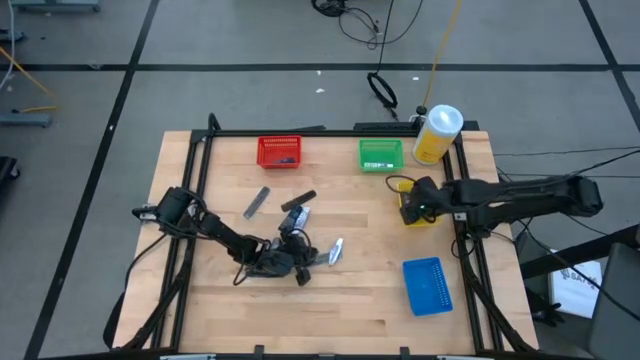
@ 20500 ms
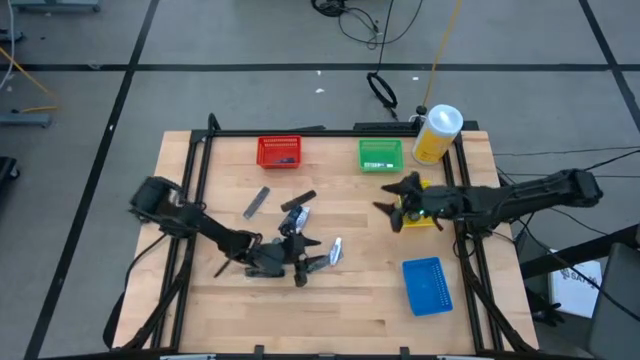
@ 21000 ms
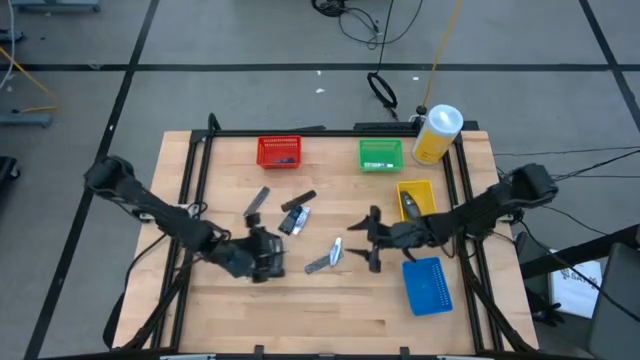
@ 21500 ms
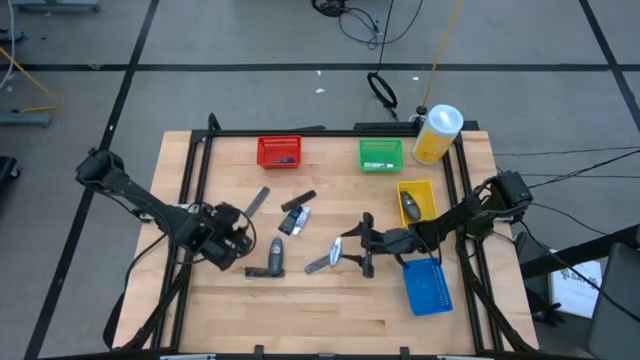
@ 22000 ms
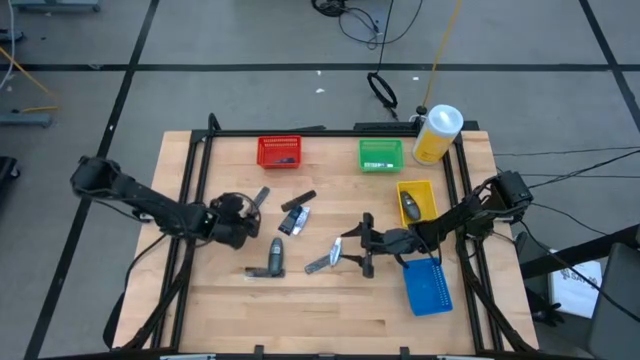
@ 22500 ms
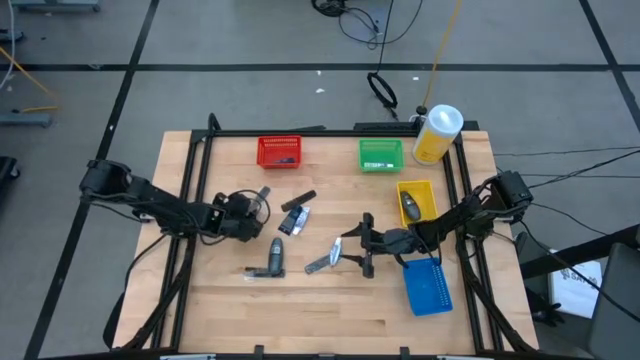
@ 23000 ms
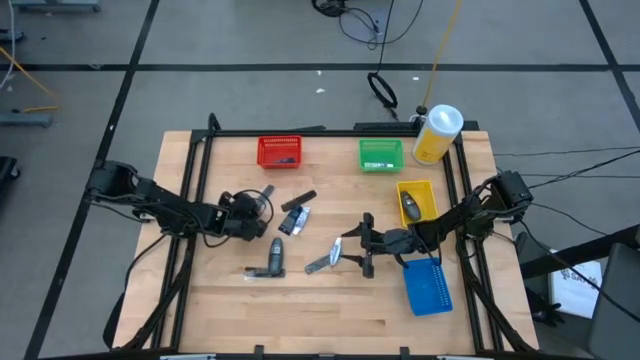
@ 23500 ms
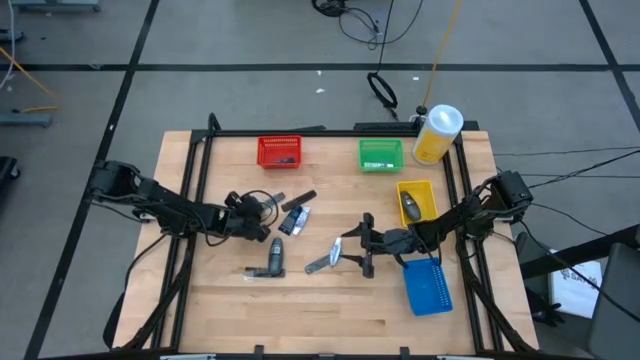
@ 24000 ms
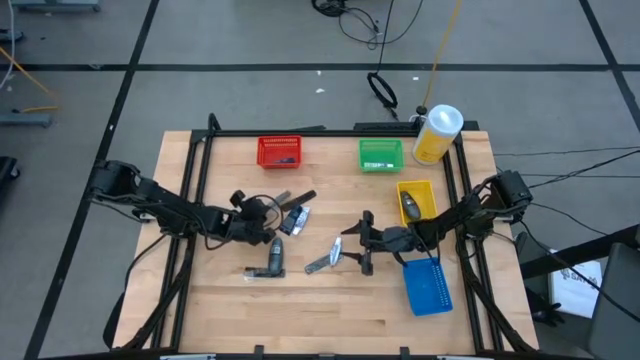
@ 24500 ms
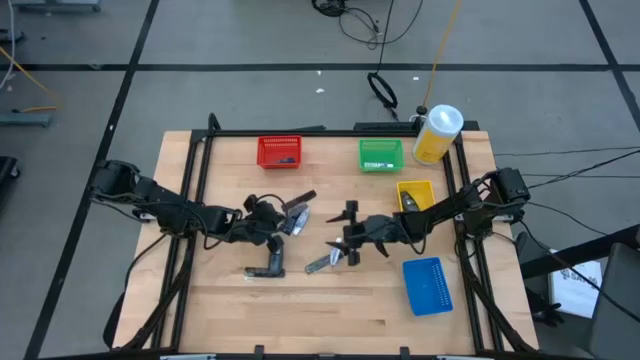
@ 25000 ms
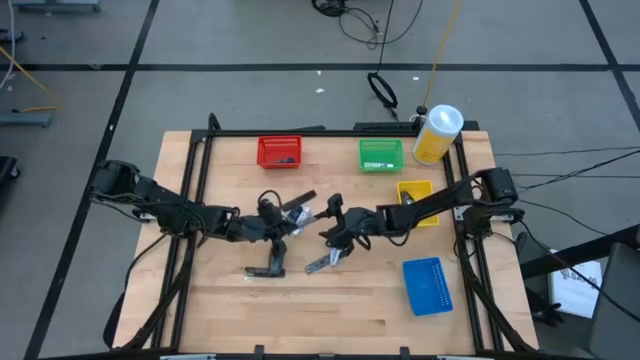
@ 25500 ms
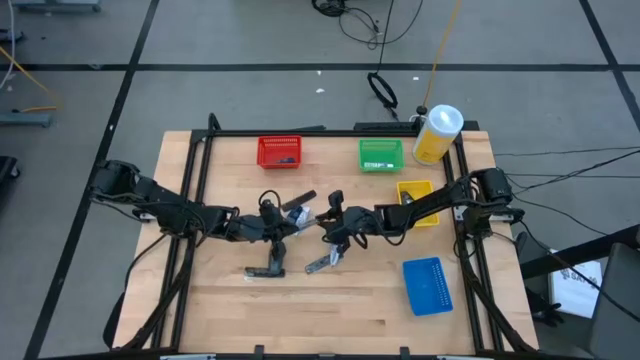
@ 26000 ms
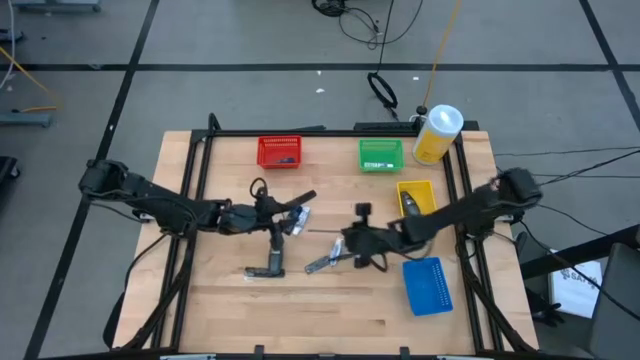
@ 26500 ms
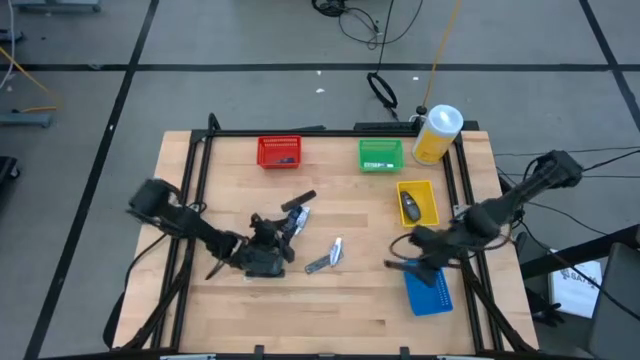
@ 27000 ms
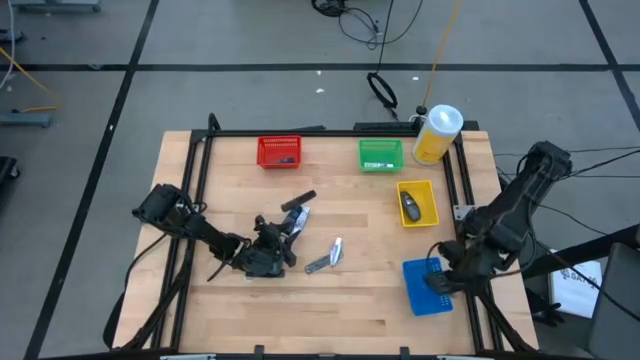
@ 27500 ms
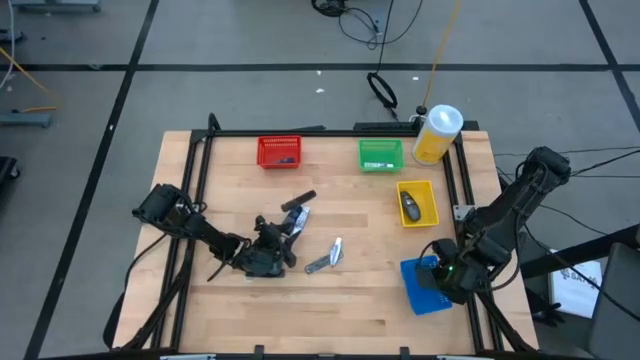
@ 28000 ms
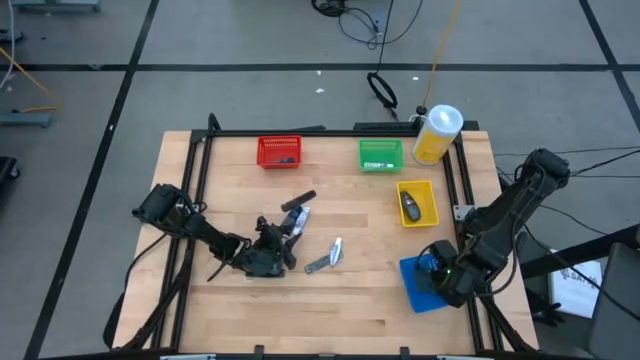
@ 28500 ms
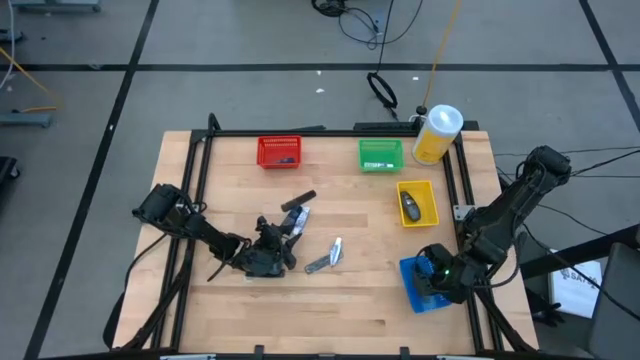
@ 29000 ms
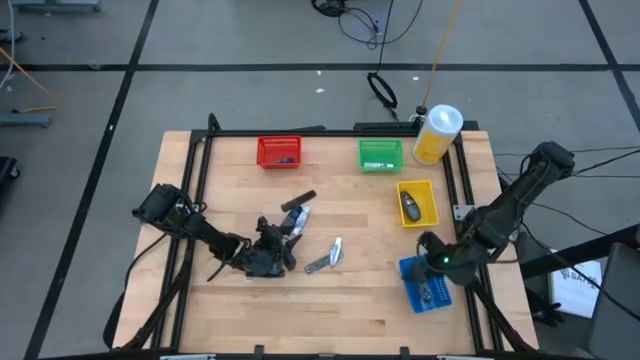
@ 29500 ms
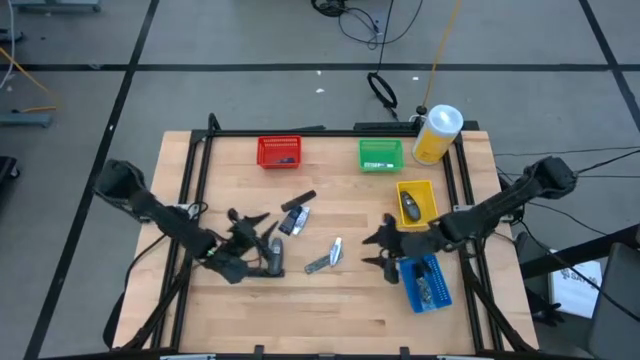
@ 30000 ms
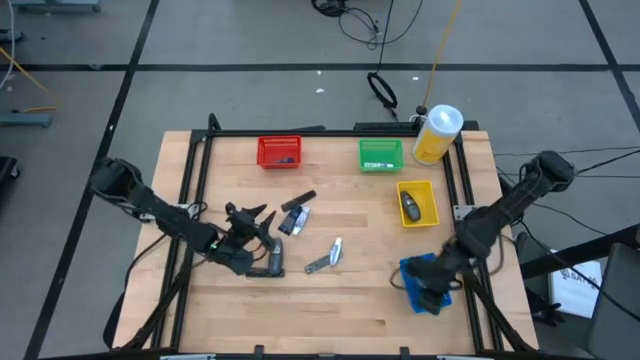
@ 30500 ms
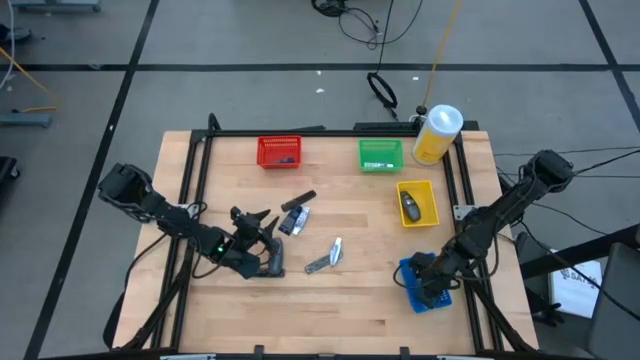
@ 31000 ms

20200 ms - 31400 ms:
Task: Pick & Place Travel size toiletries
Put the black comb into the blue bin

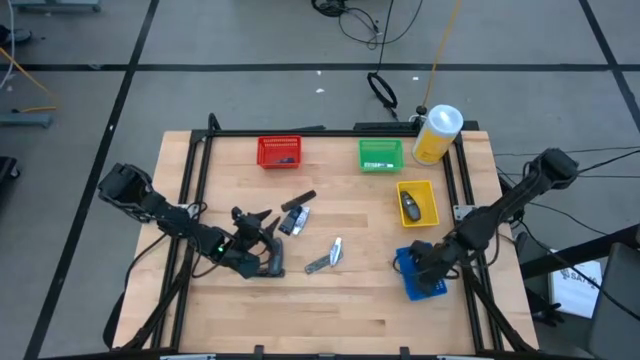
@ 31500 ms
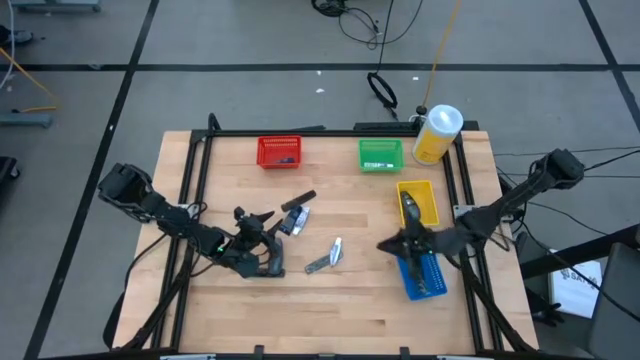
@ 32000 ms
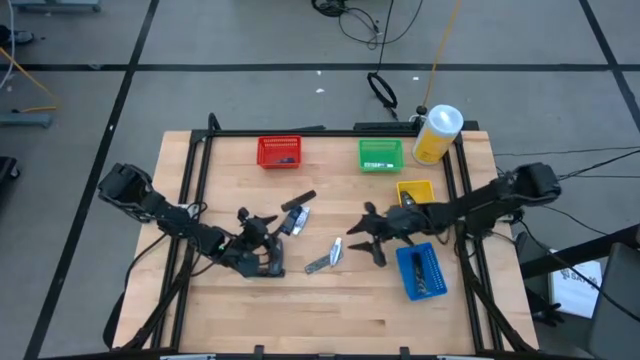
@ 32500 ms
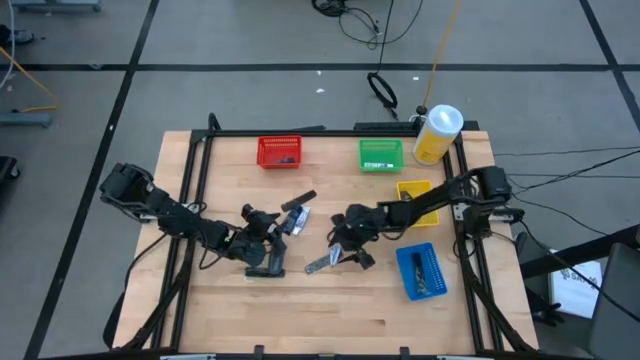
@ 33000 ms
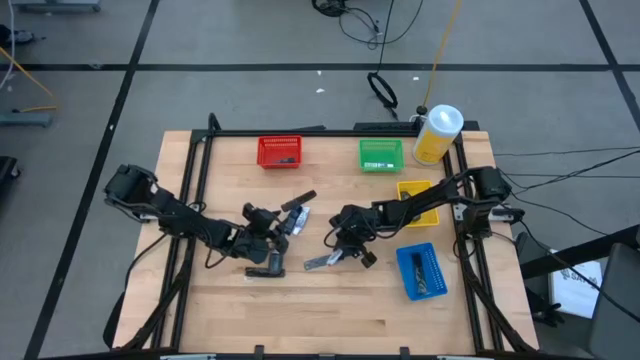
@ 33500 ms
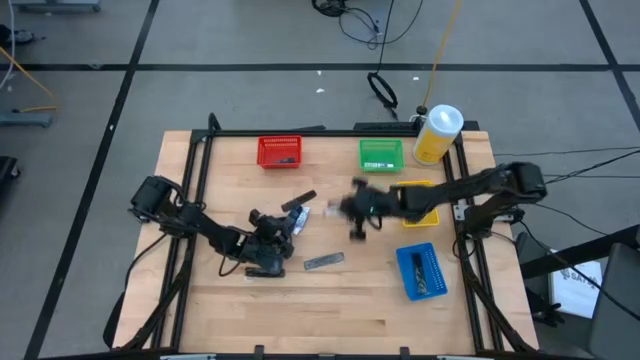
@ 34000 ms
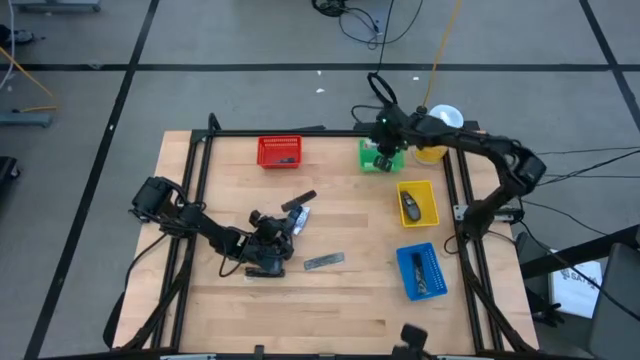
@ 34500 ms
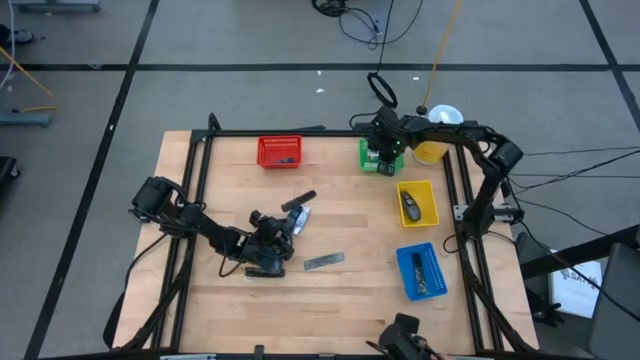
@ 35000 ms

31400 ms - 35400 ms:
Put the white toothpaste into the green bin

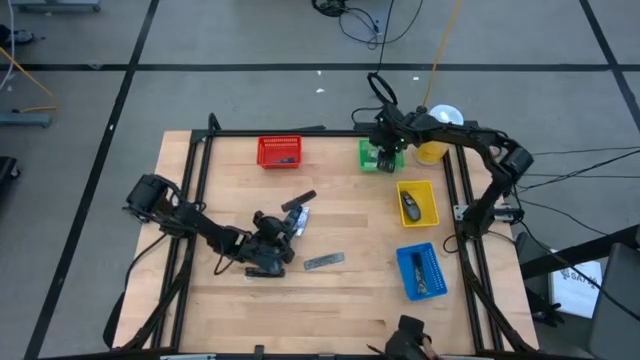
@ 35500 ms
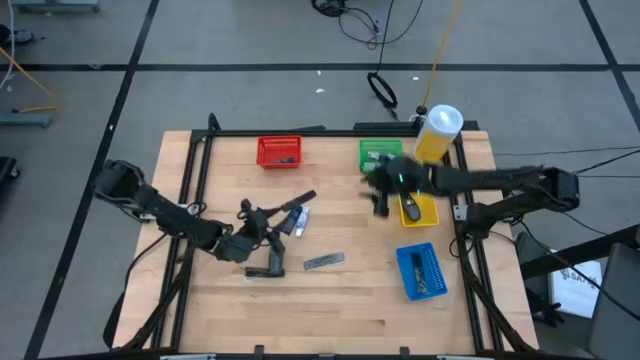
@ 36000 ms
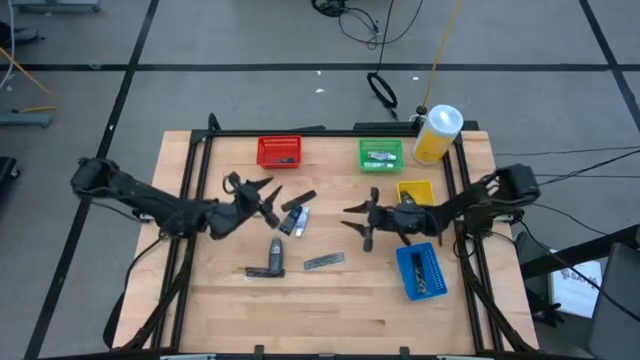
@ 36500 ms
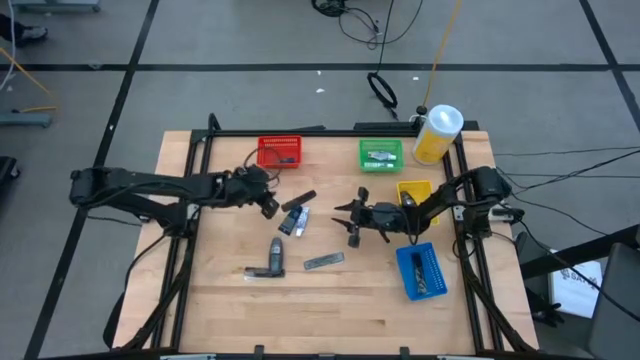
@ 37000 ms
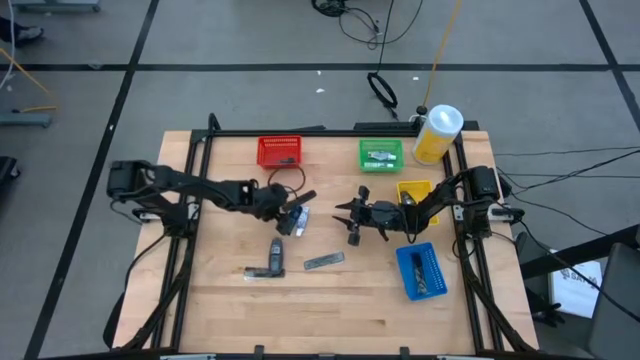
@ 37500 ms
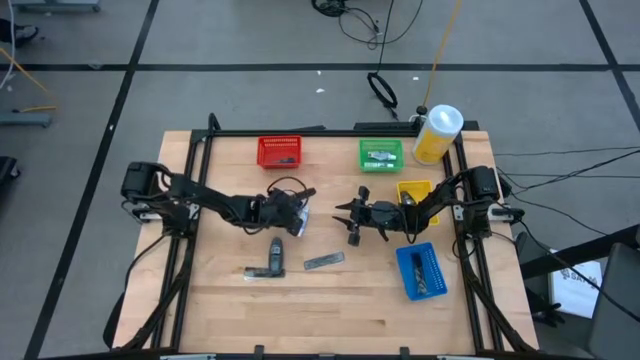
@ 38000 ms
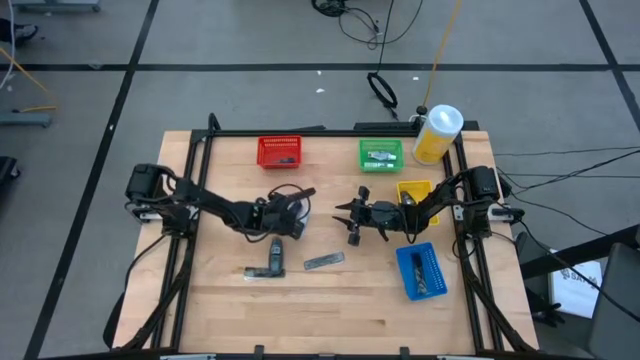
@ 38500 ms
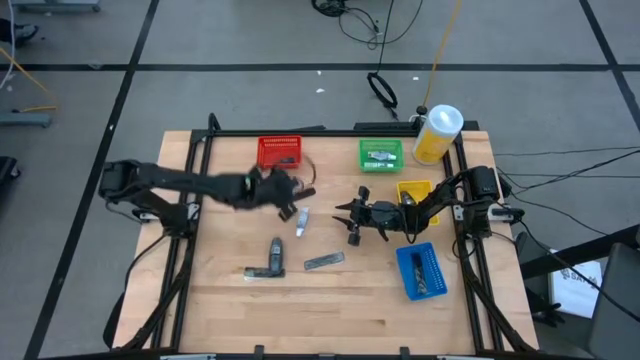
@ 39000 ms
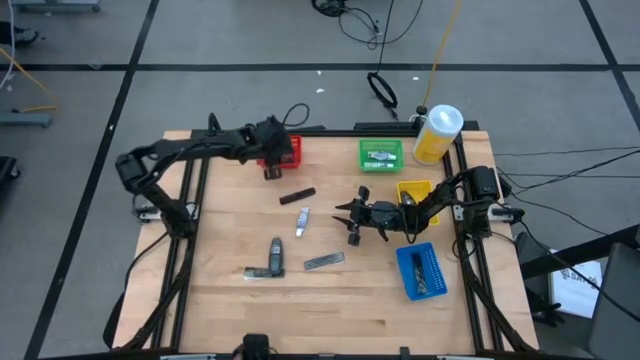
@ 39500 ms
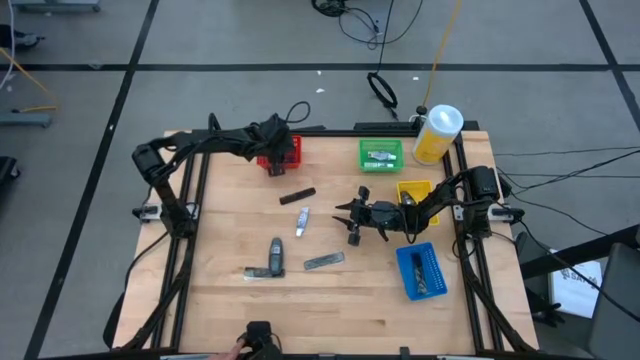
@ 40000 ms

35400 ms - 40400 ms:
Put the blue shave cream into the red bin
